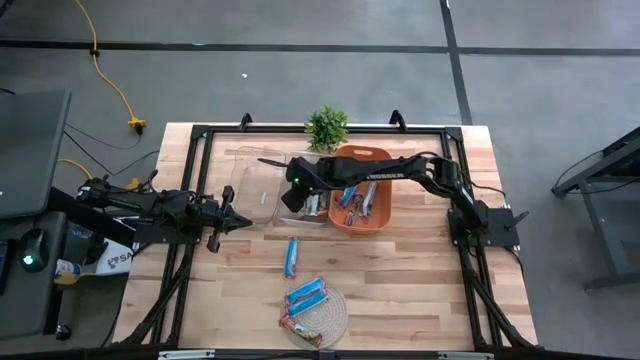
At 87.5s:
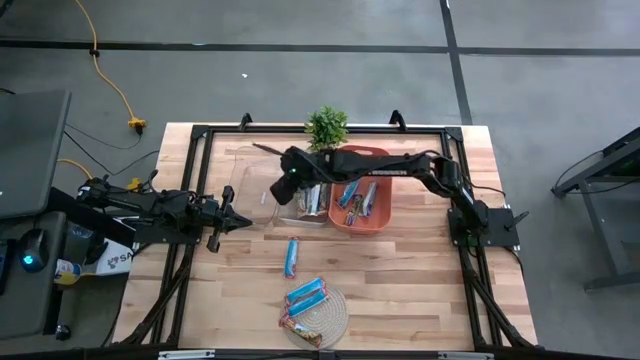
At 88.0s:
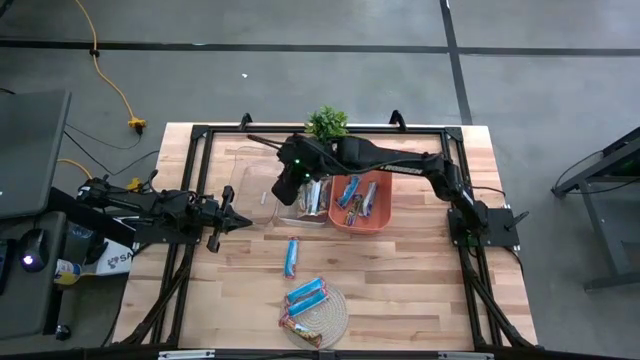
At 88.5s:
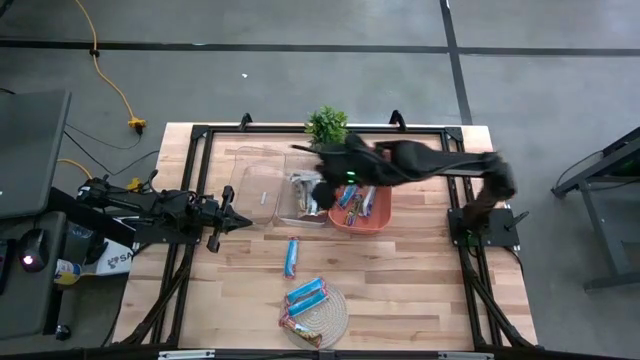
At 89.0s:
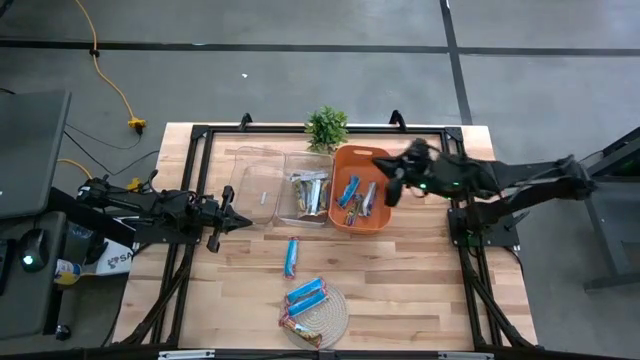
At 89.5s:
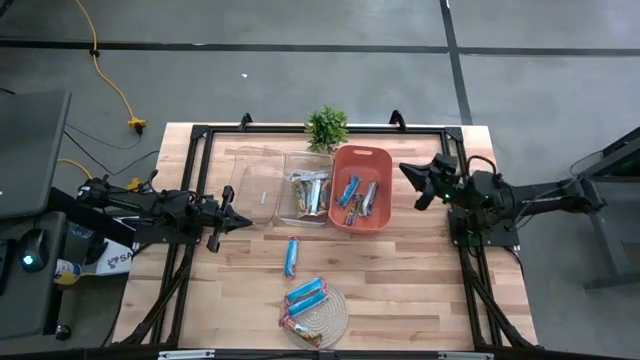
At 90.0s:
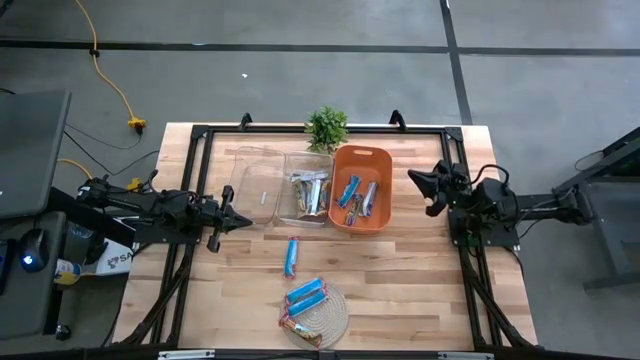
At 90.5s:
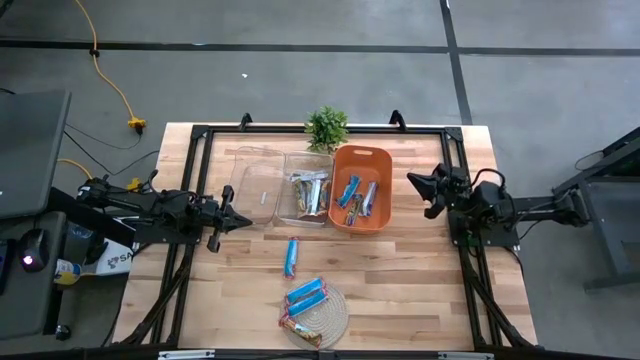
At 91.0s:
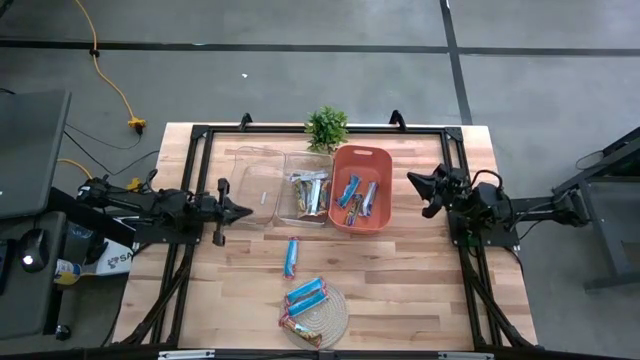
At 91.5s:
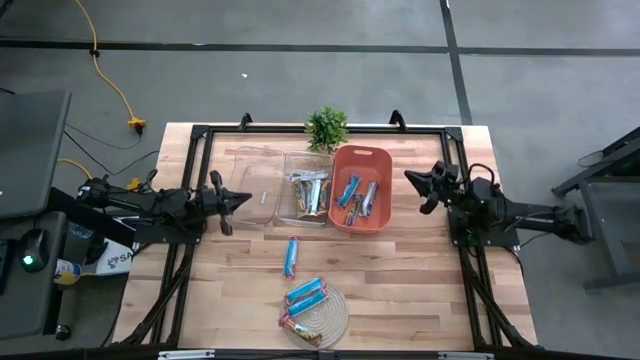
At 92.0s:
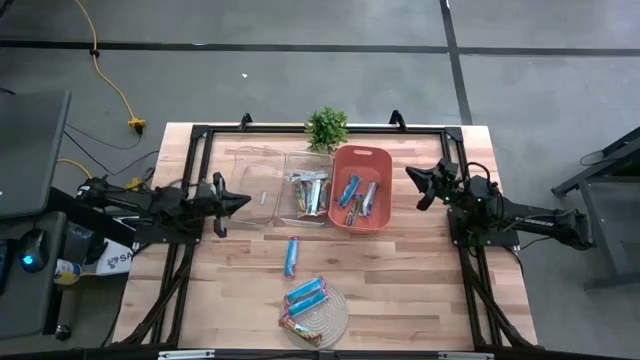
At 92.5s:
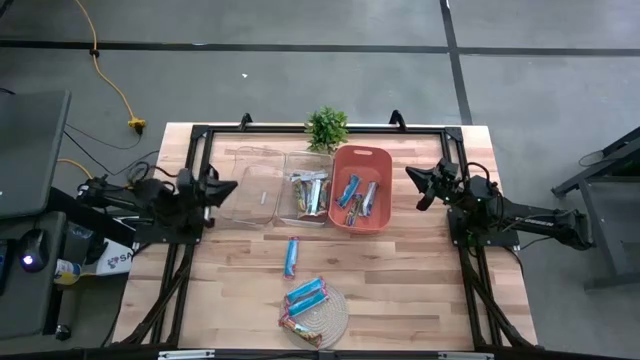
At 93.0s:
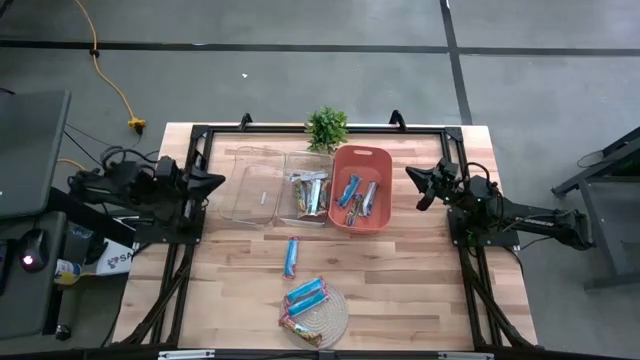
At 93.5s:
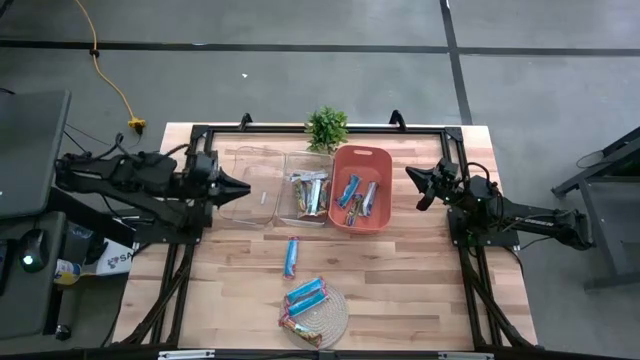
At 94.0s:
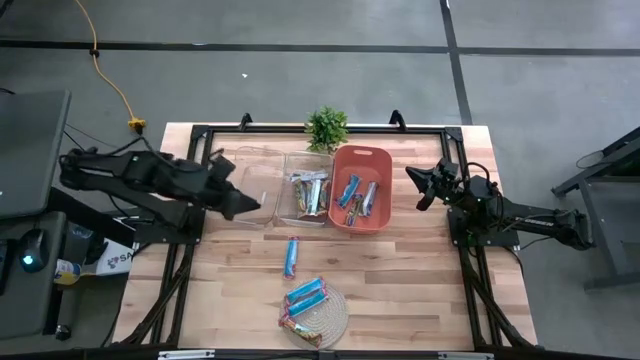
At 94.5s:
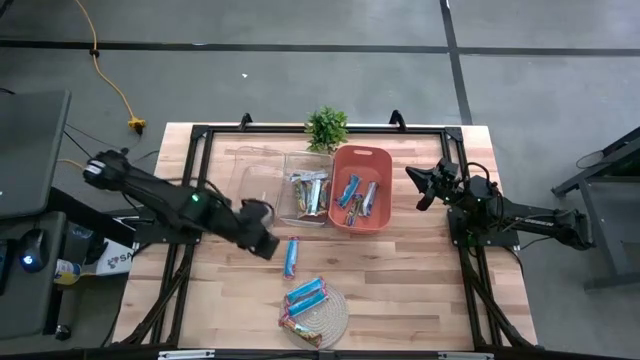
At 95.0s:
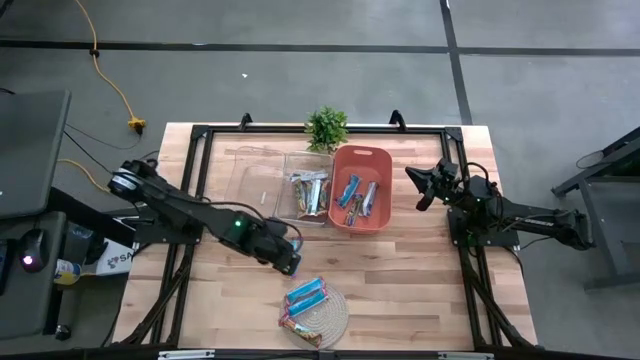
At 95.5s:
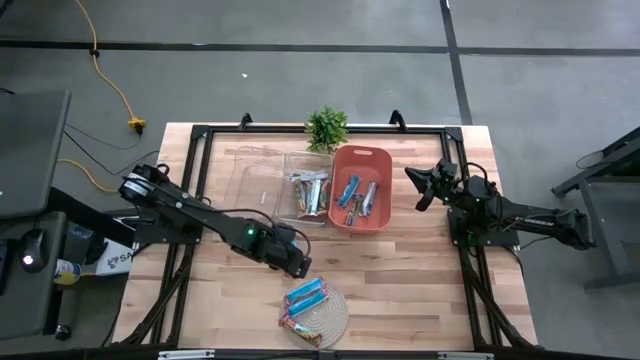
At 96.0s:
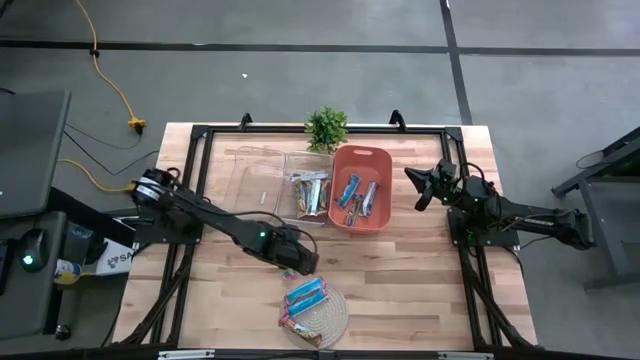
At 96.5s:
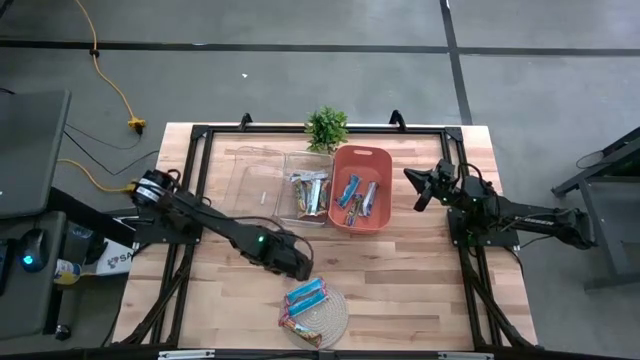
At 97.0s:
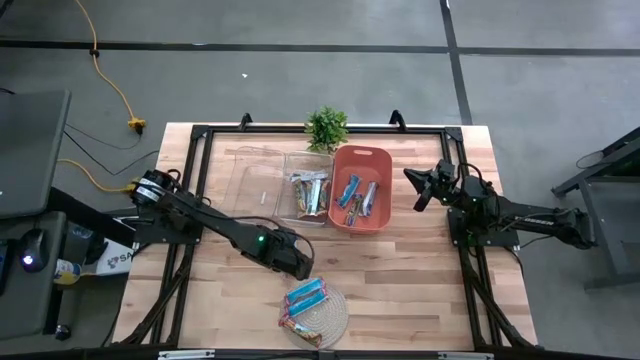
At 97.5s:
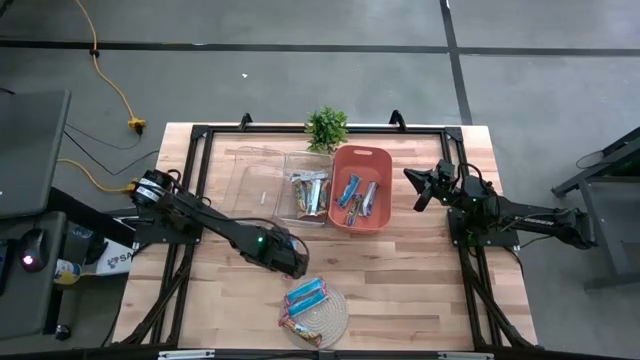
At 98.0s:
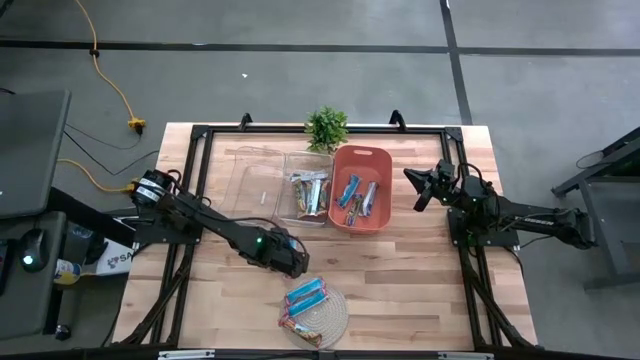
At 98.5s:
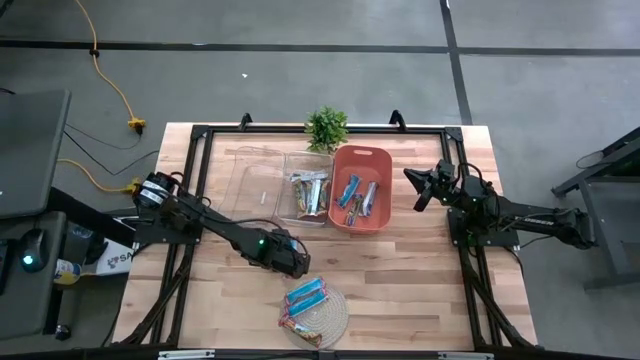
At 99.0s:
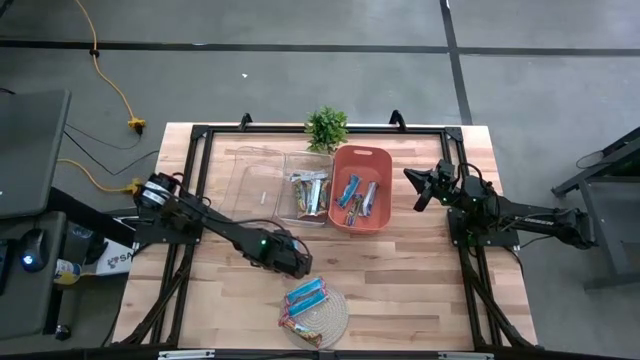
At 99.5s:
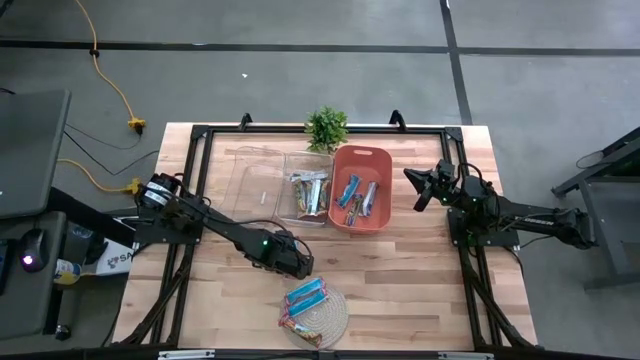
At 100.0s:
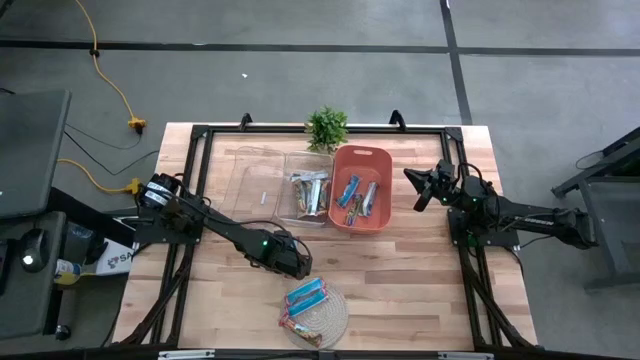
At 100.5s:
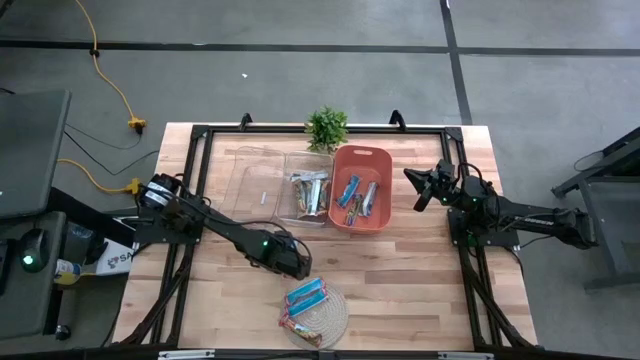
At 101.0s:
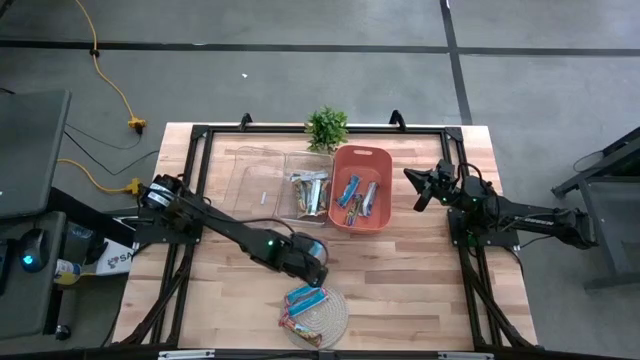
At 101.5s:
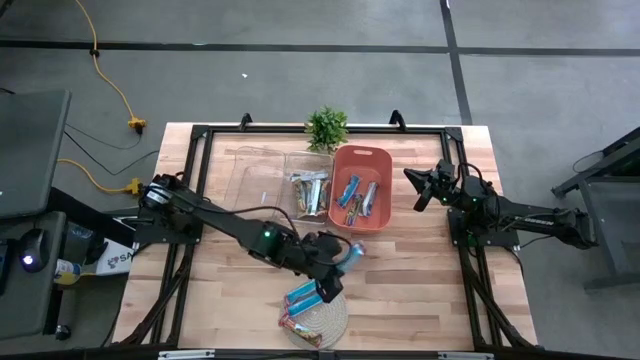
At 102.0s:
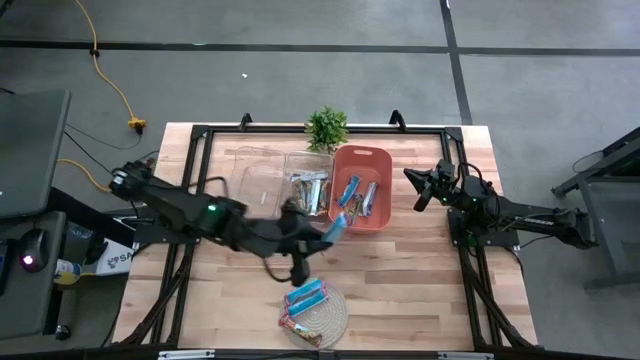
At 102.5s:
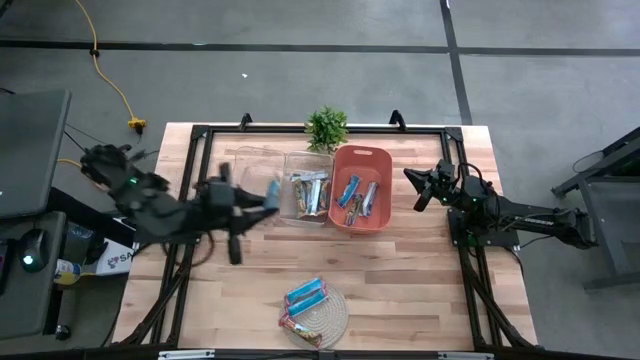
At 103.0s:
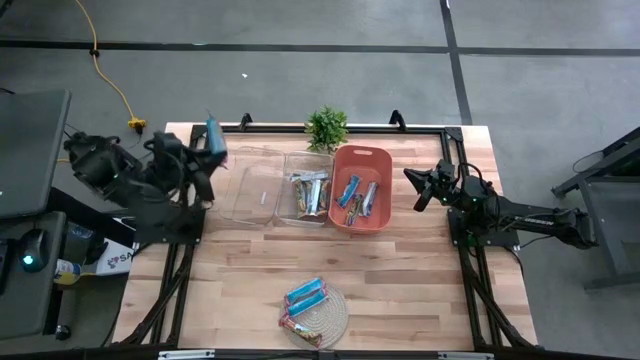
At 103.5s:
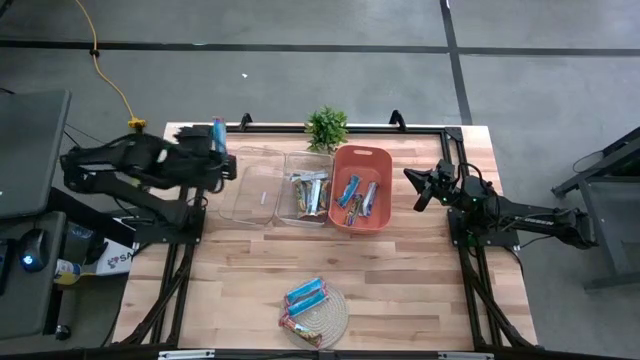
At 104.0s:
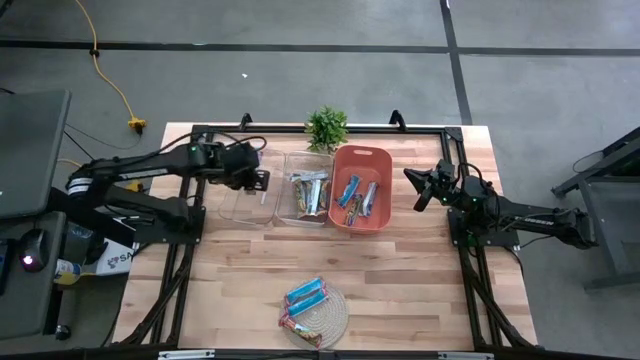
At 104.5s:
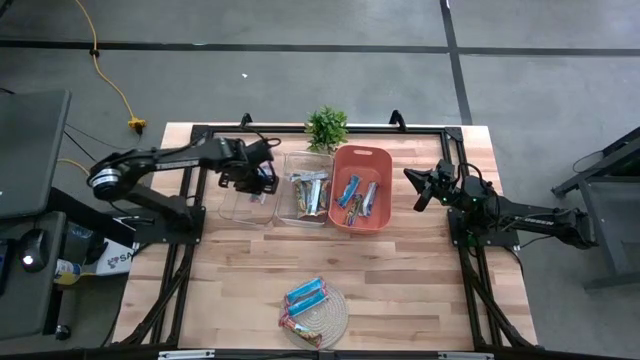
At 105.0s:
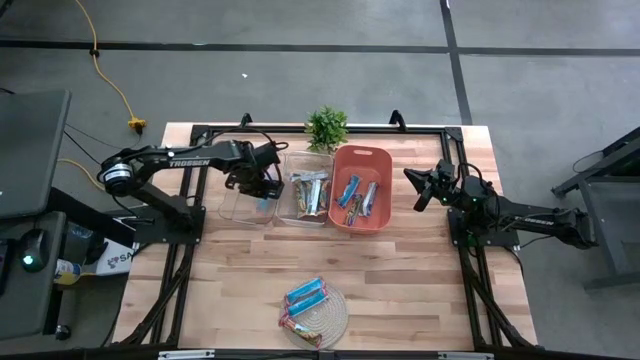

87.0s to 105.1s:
Task: Pick and place Granola Bars by type
Put the red granola bar into the left transparent bin
